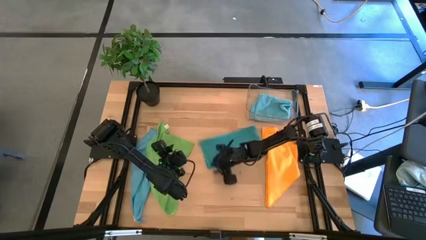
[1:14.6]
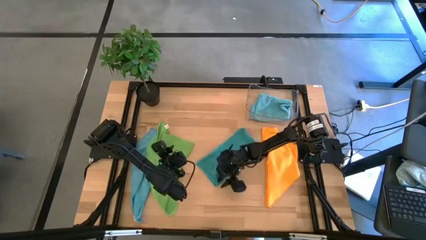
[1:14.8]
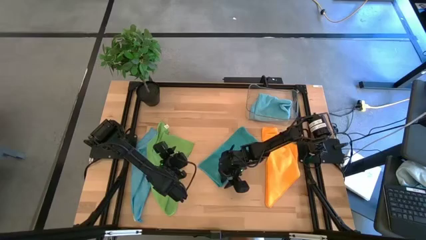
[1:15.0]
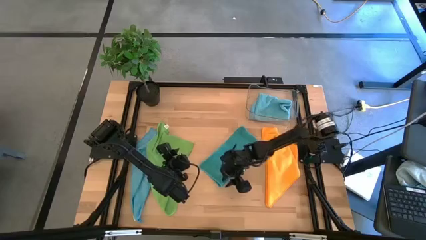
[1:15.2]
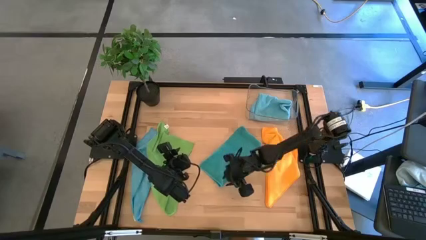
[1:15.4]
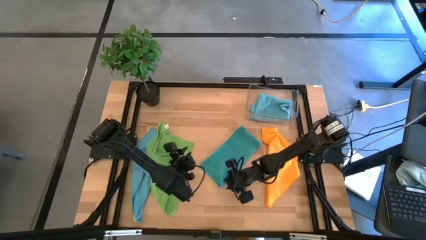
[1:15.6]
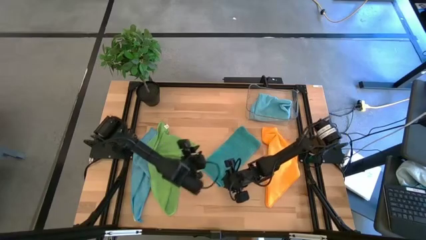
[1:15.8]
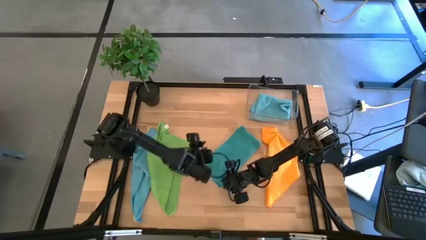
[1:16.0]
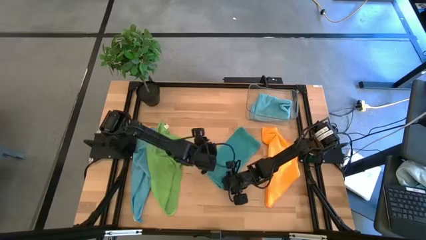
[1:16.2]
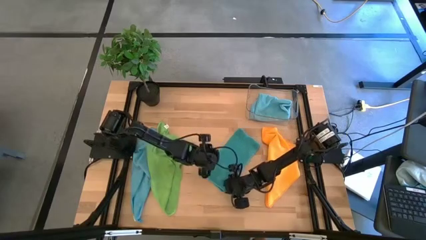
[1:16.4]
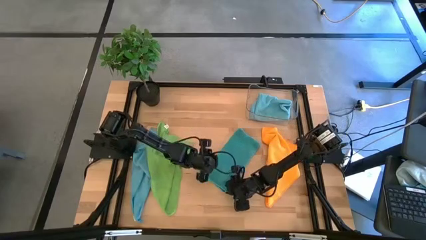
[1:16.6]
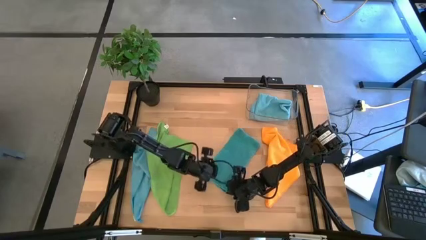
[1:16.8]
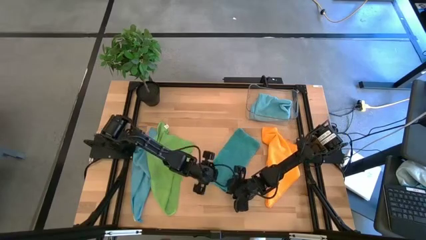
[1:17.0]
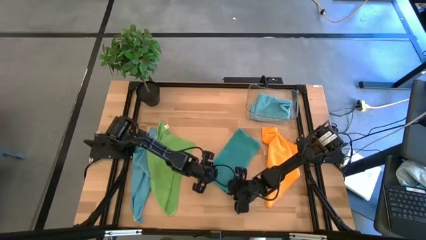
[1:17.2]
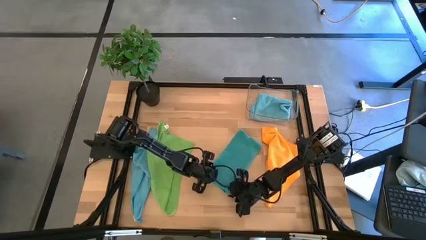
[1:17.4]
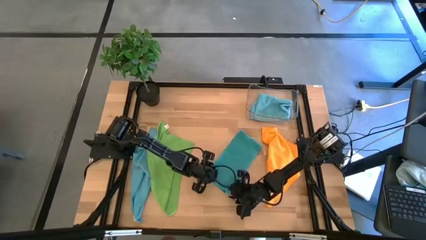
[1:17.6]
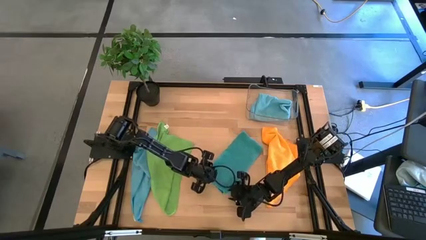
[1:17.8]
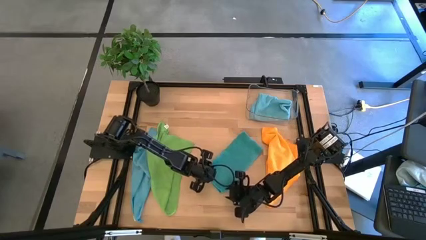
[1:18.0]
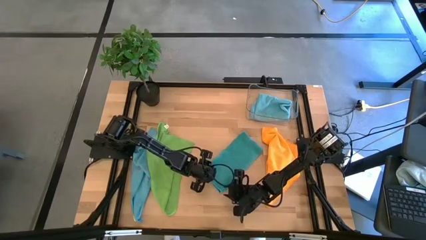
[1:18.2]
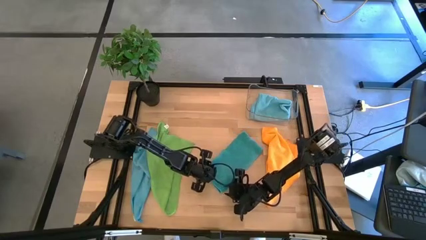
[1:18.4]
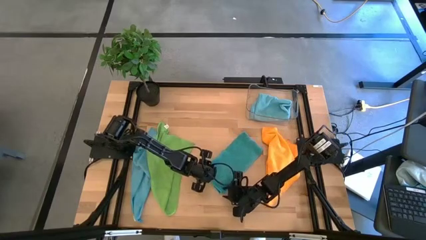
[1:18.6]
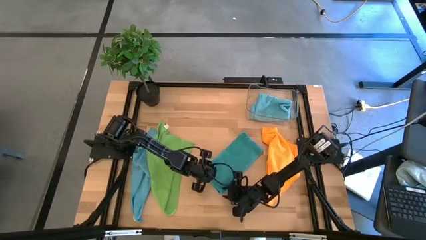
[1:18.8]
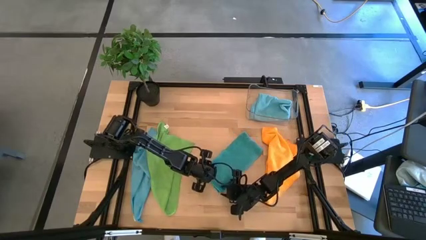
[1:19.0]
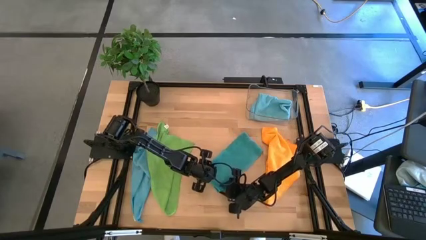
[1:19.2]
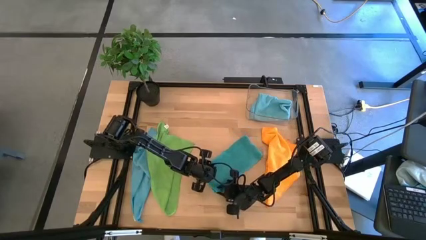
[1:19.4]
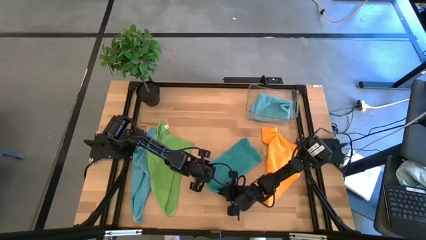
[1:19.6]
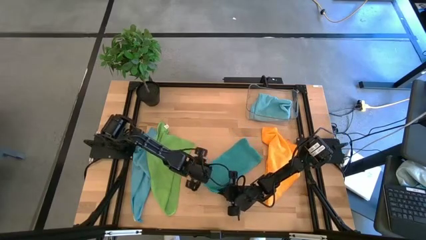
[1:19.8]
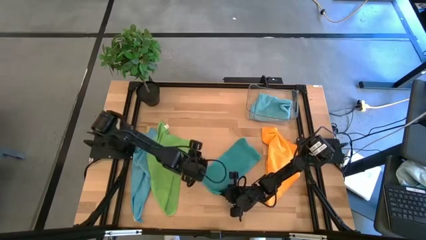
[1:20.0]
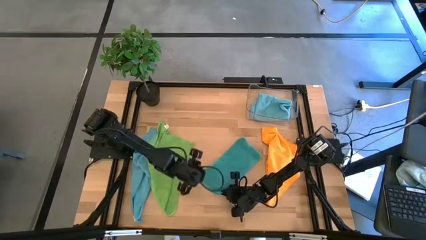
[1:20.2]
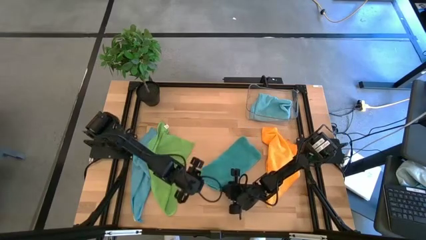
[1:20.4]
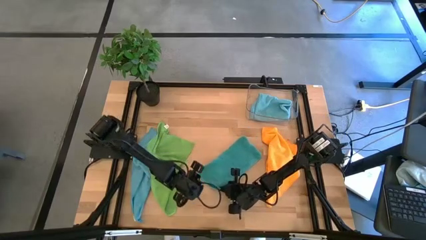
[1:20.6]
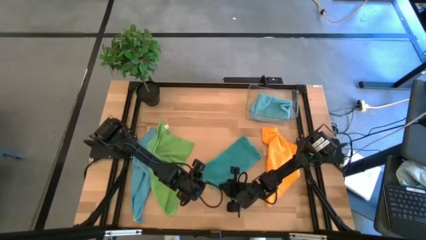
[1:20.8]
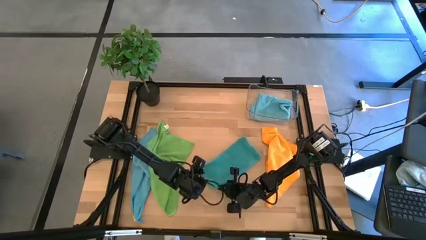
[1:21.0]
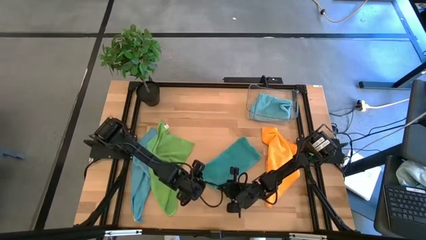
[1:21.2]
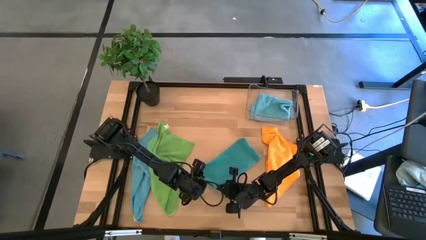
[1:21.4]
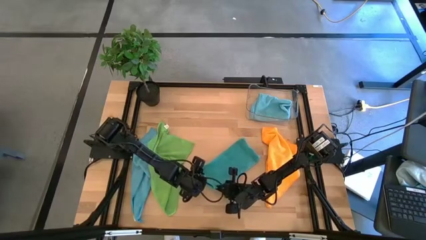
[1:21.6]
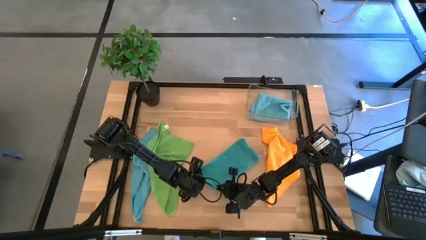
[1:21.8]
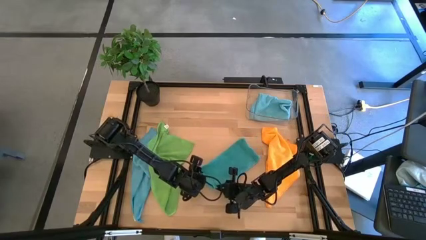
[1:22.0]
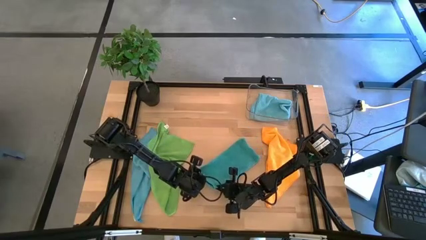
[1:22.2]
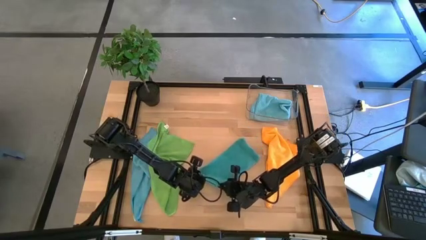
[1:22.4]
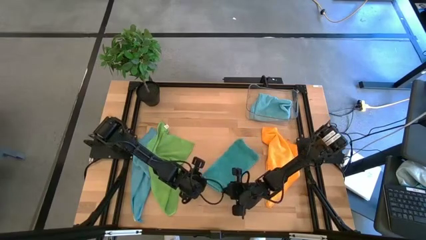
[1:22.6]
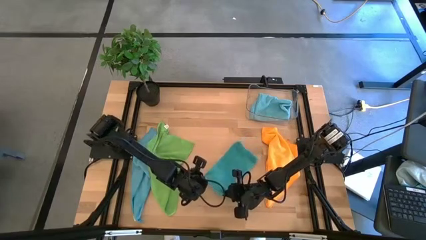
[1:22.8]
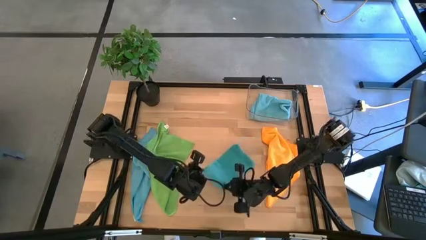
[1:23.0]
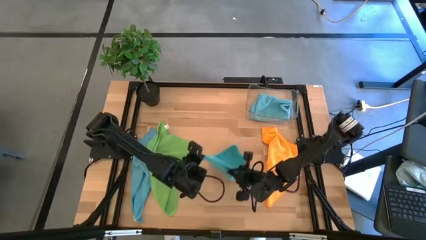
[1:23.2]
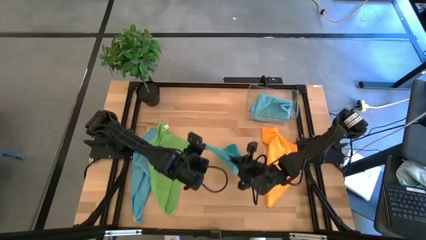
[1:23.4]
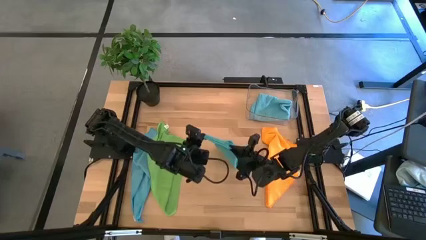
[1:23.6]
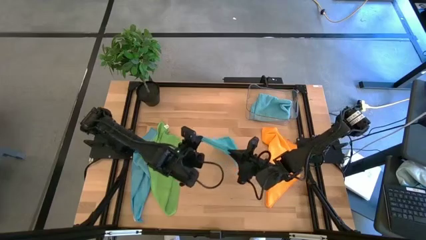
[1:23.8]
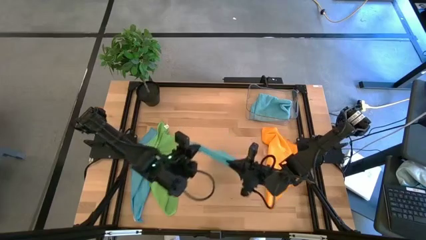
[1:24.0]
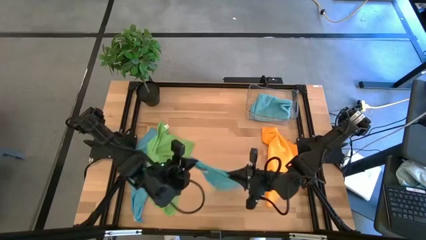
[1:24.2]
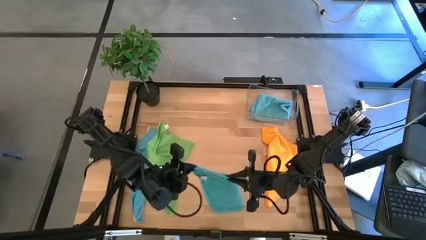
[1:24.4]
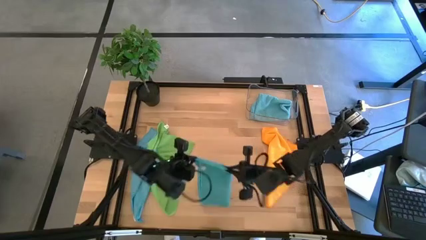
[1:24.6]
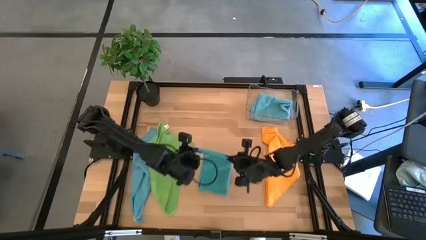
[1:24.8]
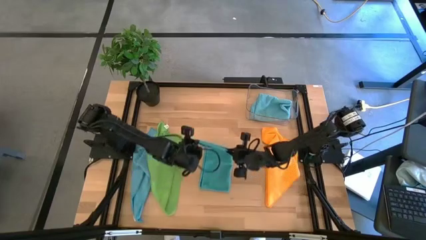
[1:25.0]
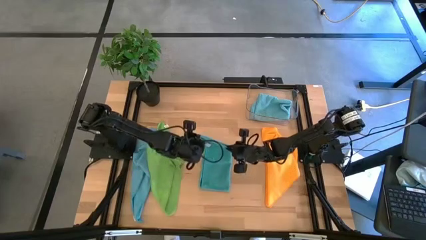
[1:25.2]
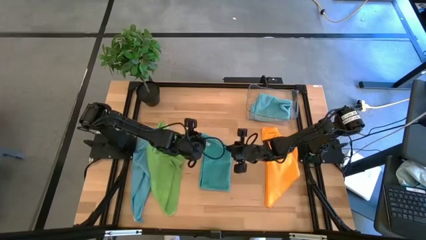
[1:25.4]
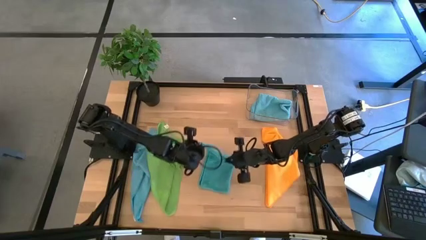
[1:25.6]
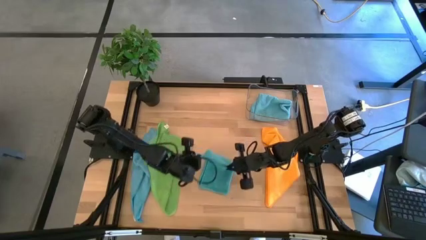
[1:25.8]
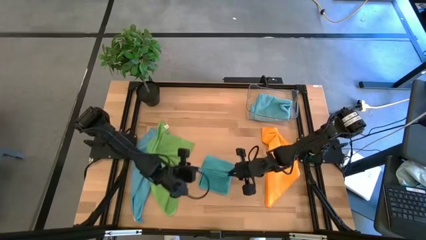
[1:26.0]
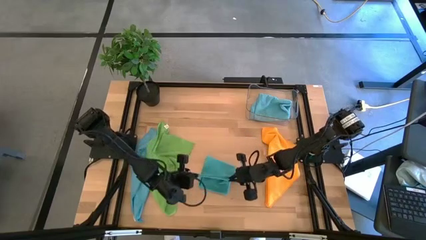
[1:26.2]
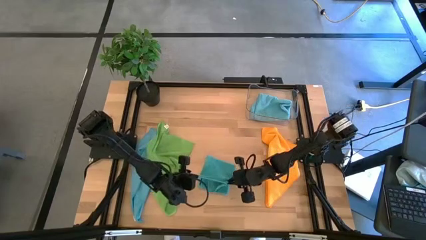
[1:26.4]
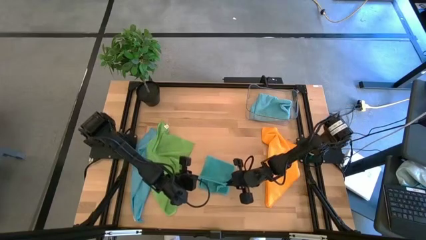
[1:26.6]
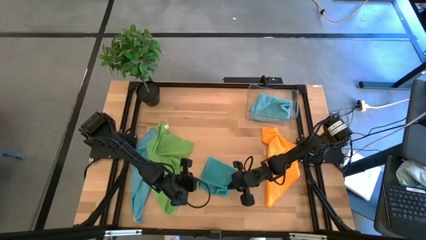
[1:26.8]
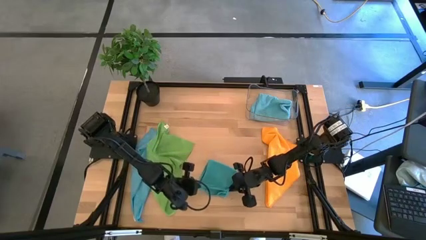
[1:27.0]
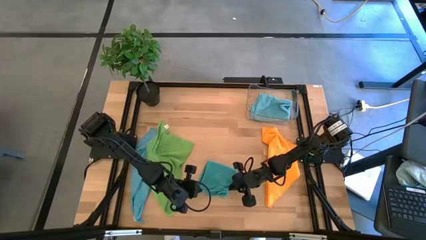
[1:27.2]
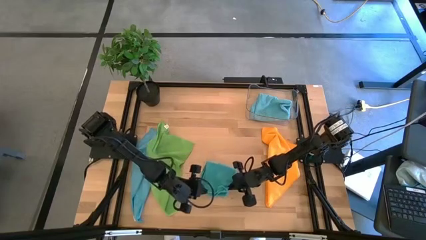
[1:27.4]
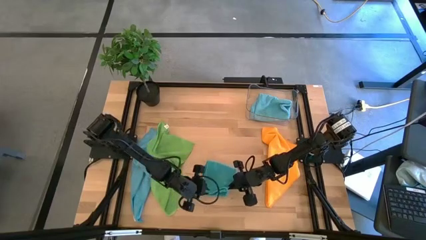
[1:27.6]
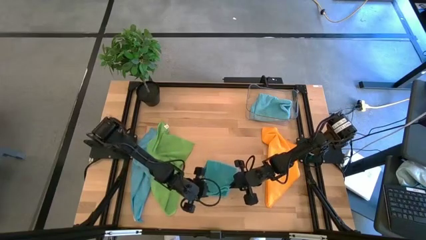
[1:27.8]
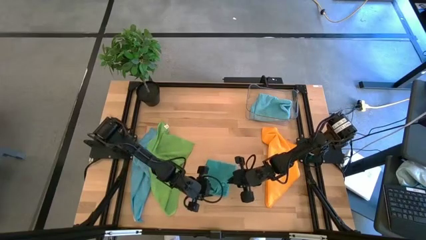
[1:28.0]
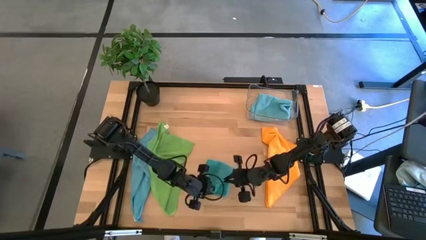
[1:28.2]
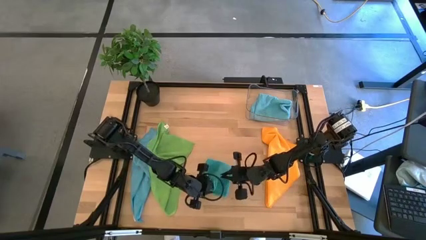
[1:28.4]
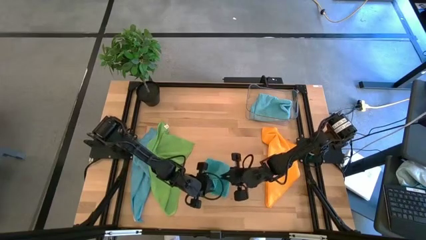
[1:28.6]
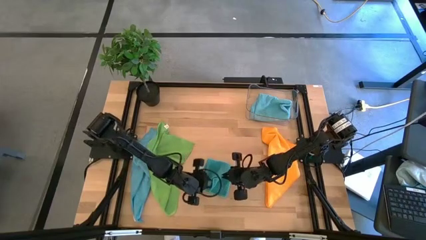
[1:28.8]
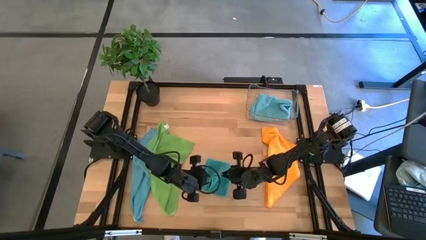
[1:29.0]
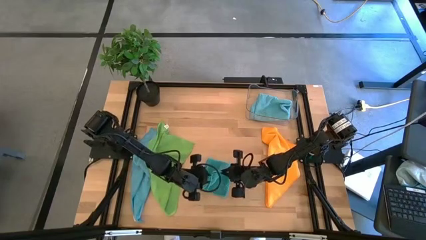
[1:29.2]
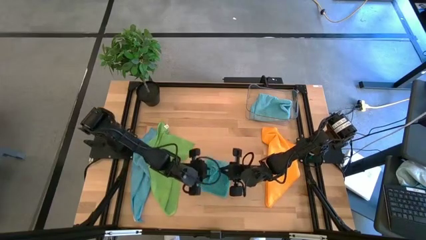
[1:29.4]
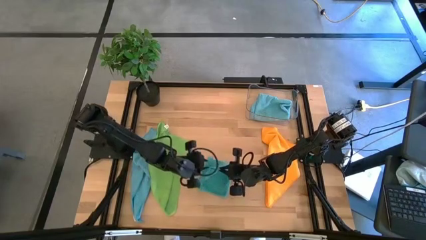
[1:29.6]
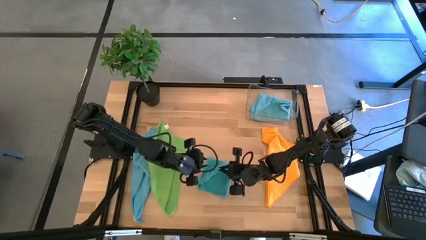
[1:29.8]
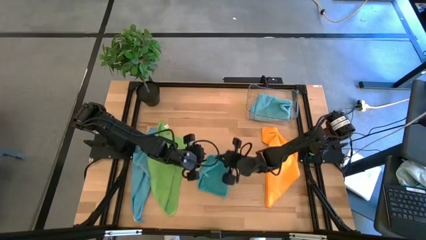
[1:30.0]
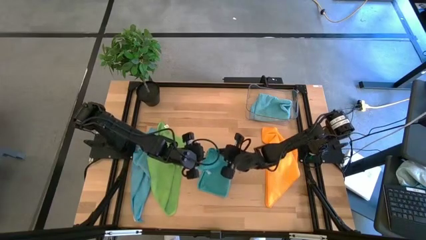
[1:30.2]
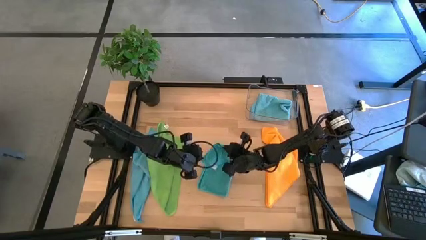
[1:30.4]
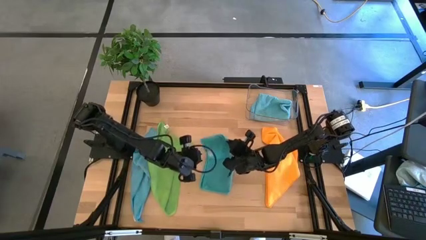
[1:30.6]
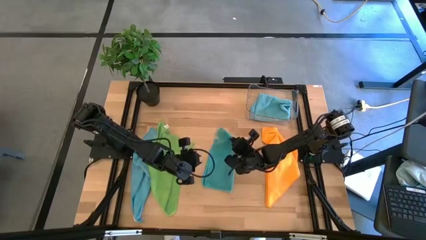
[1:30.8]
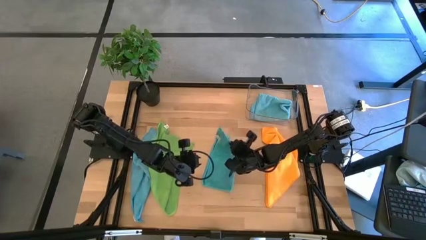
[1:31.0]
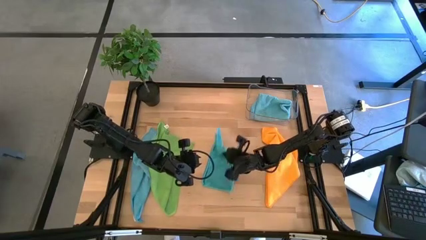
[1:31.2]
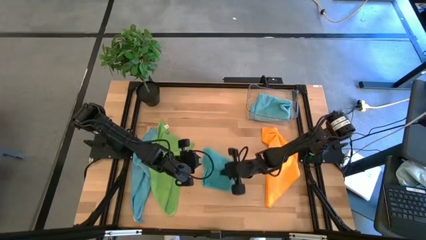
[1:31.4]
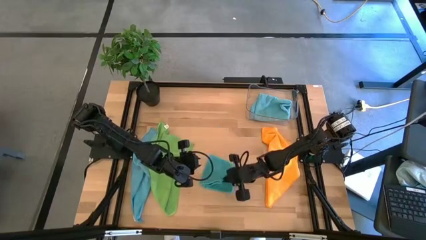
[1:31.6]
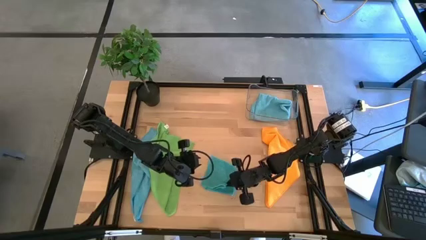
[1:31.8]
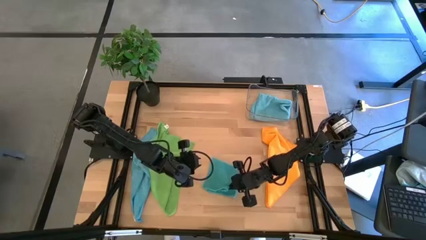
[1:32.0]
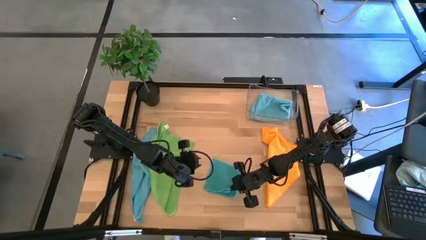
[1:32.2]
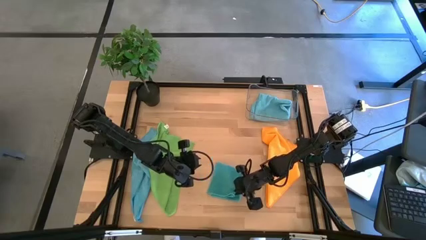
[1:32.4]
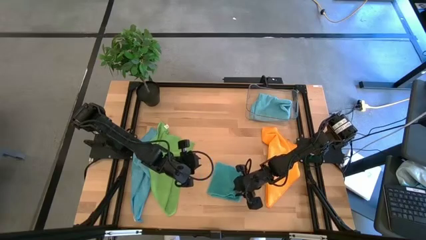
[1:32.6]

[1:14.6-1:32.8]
Task: Fold microfiber towels
Fold the blue Fold the blue microfiber towel
